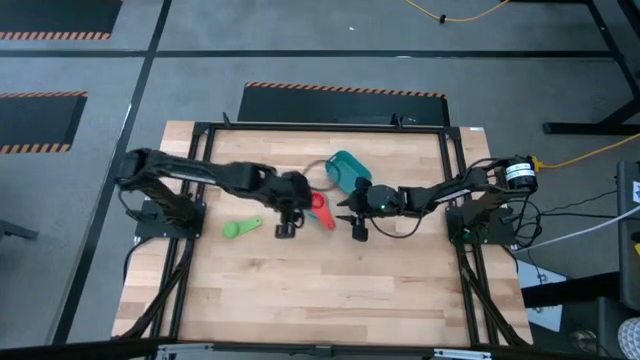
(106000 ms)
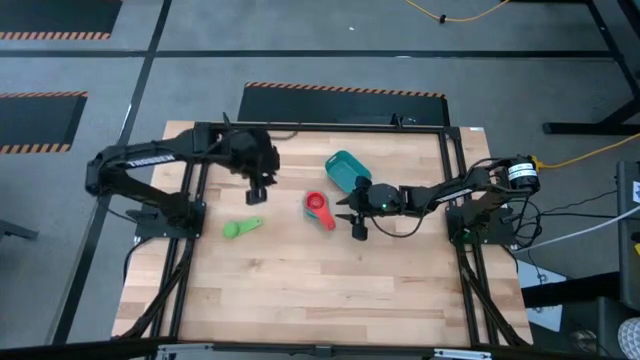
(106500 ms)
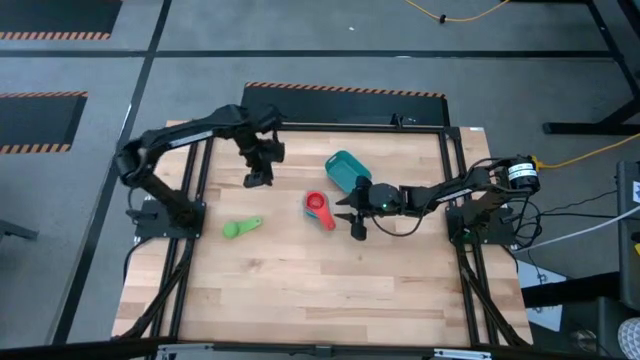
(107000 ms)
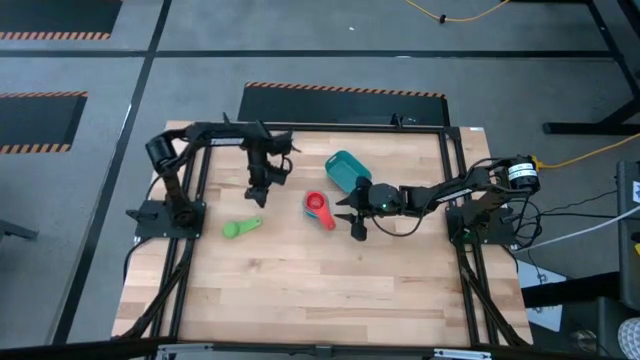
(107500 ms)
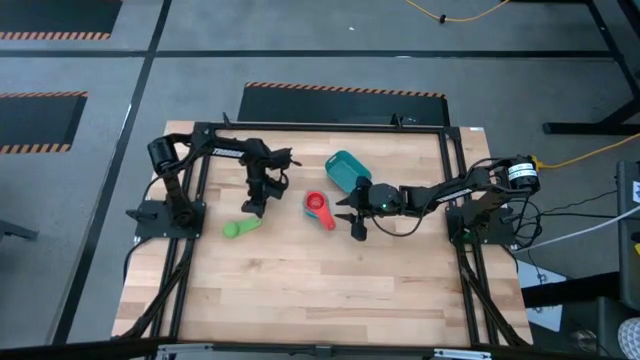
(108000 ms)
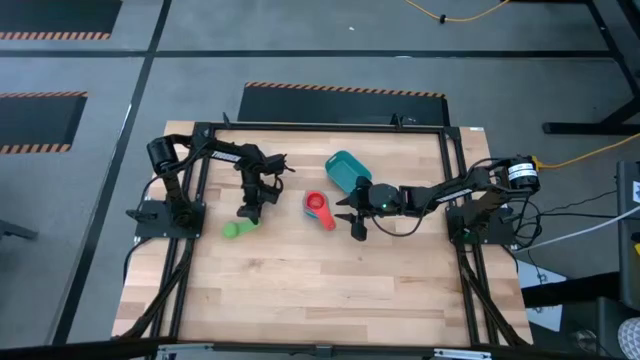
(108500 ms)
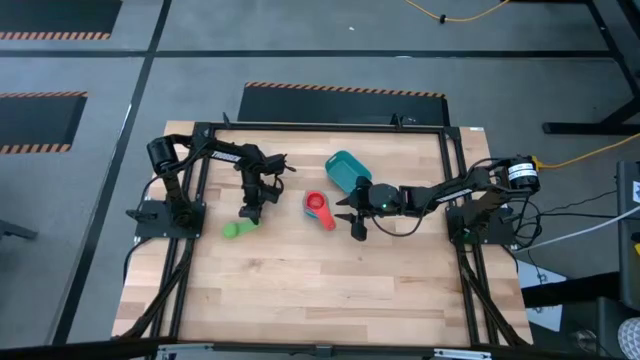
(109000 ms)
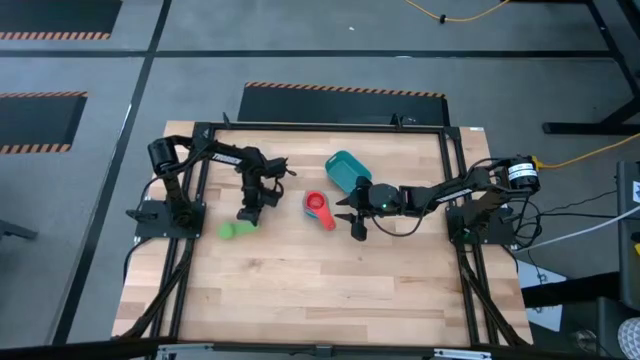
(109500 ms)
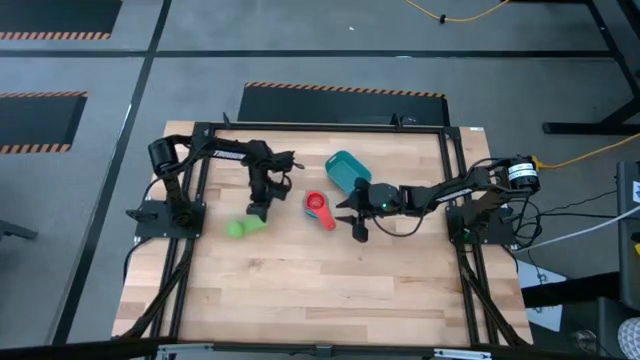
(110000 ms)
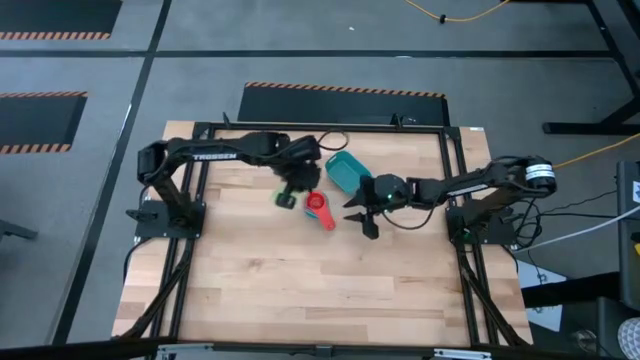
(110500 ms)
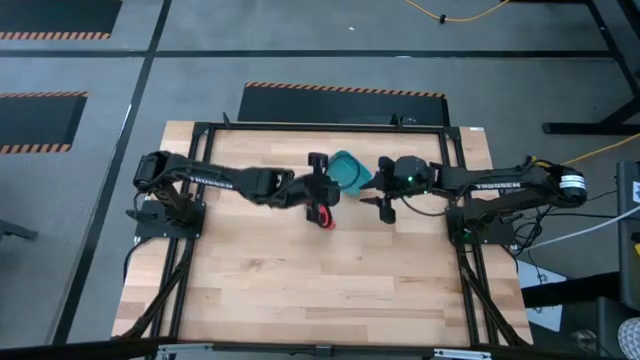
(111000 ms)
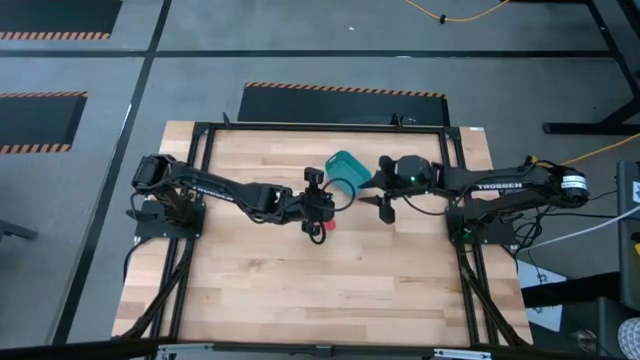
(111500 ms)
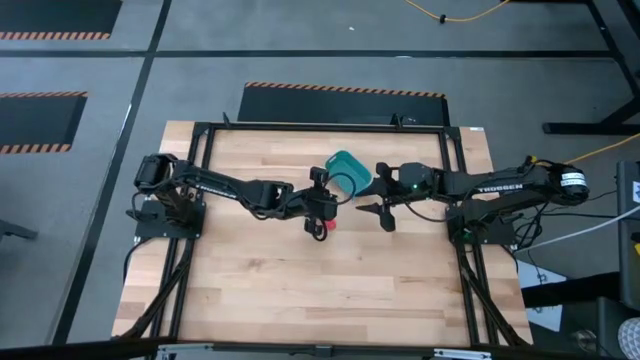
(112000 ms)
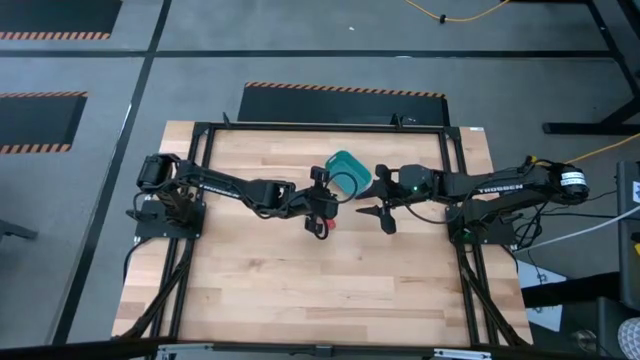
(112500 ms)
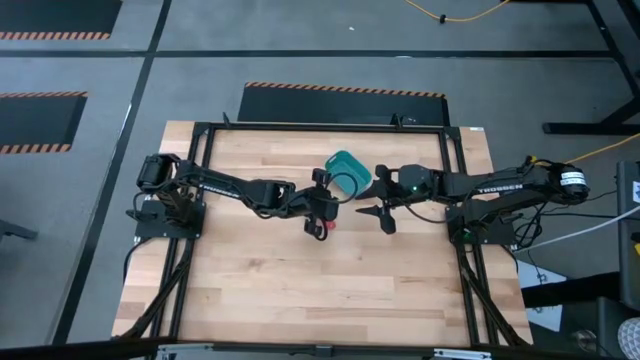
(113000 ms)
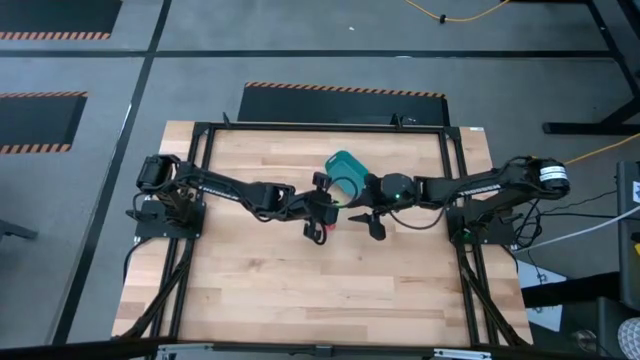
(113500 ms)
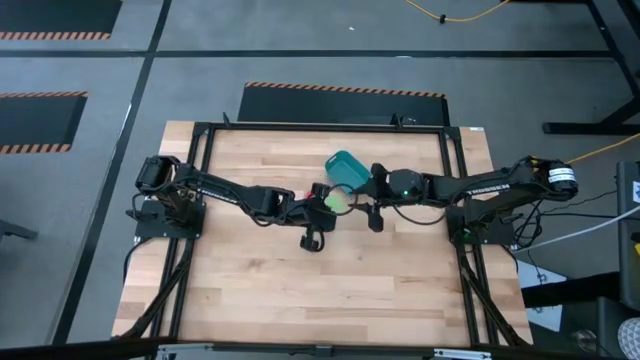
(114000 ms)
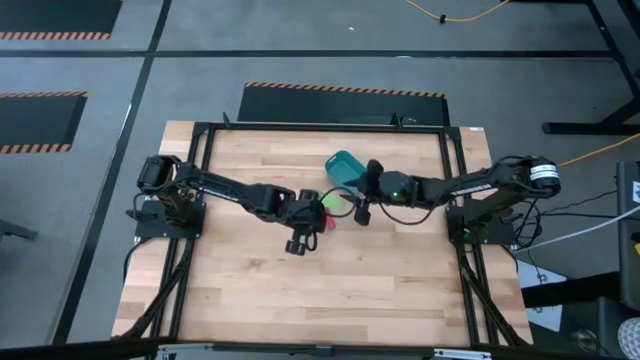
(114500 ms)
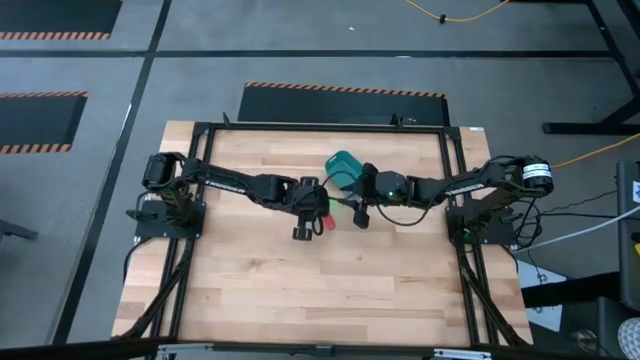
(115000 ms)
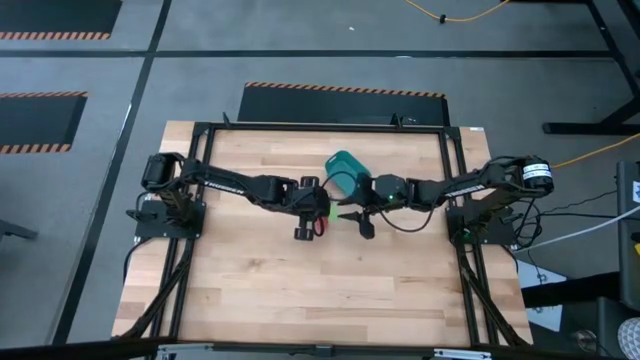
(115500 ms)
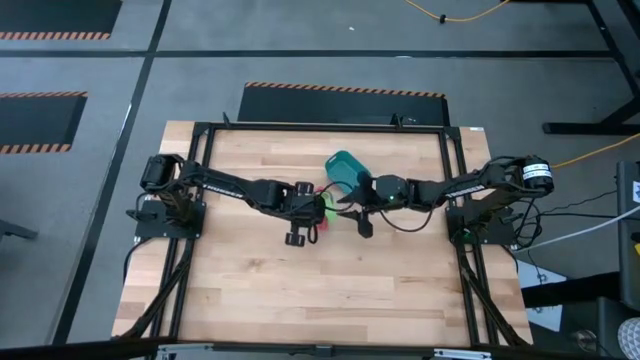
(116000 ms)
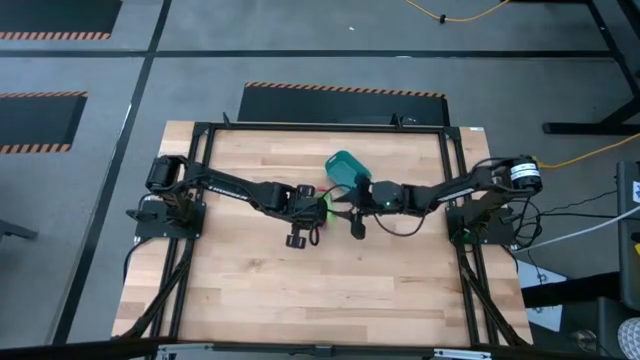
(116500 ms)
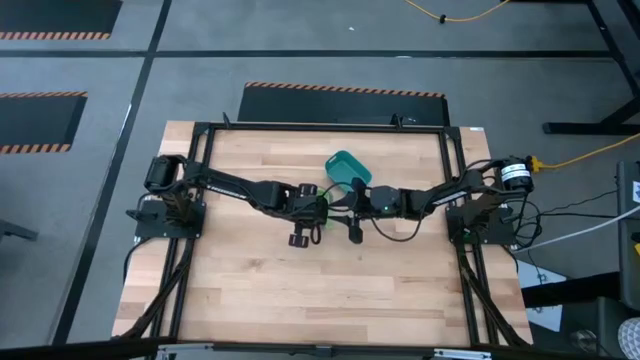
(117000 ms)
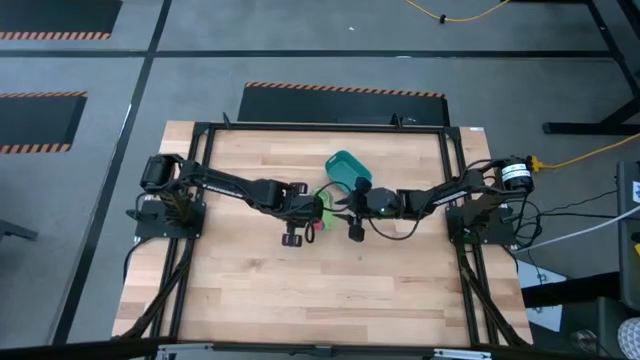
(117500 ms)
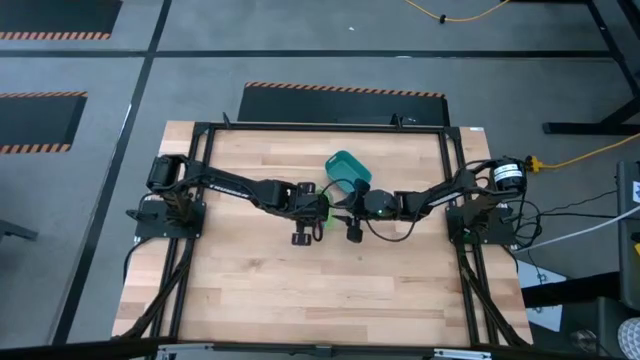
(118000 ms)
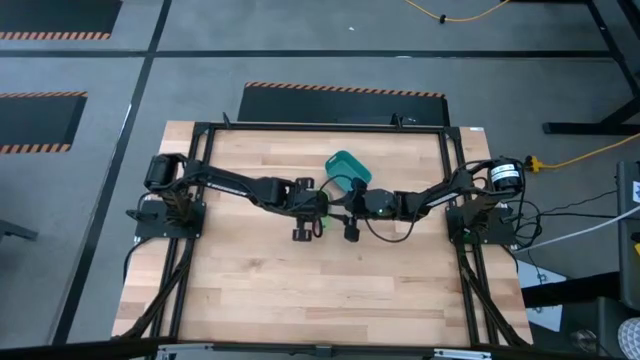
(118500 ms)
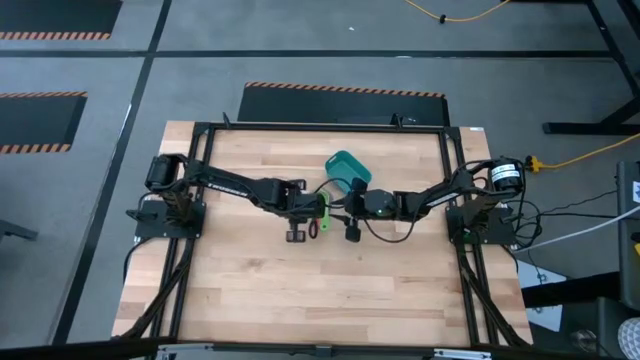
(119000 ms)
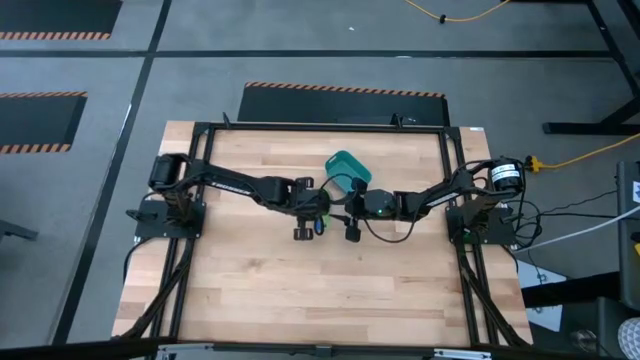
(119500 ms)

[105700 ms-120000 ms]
Task: Nest measuring cups in basket
Stack the green measuring cup on top of the red measuring cup
